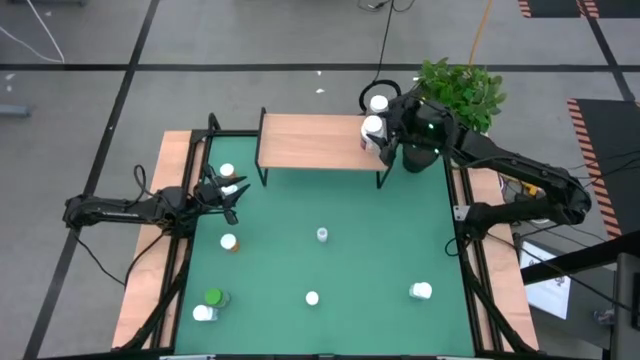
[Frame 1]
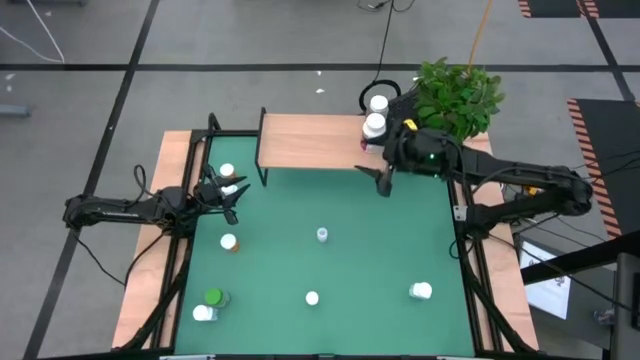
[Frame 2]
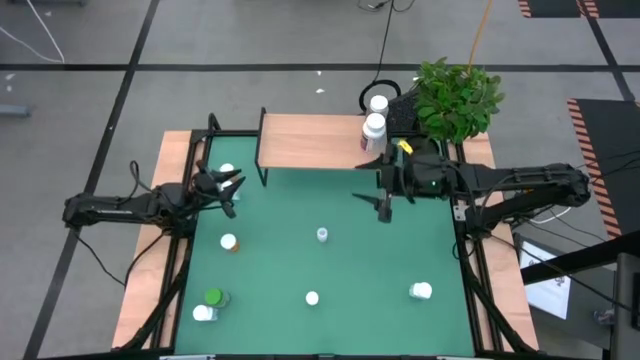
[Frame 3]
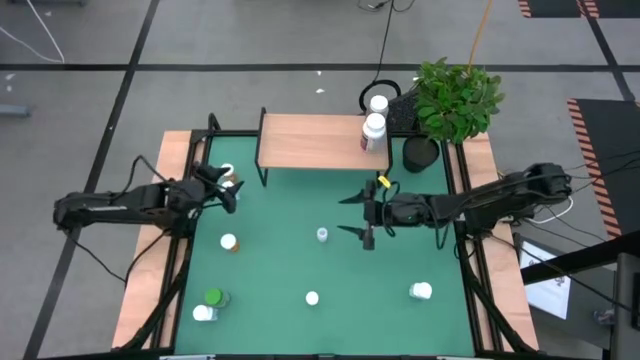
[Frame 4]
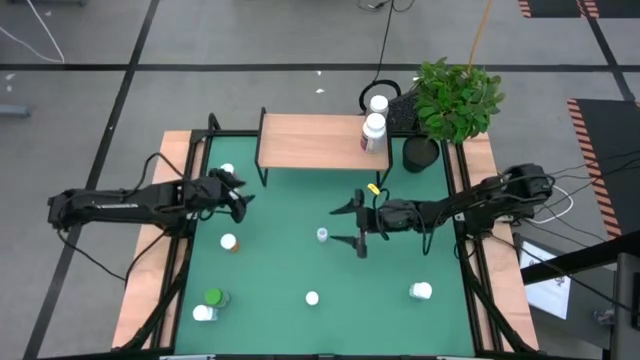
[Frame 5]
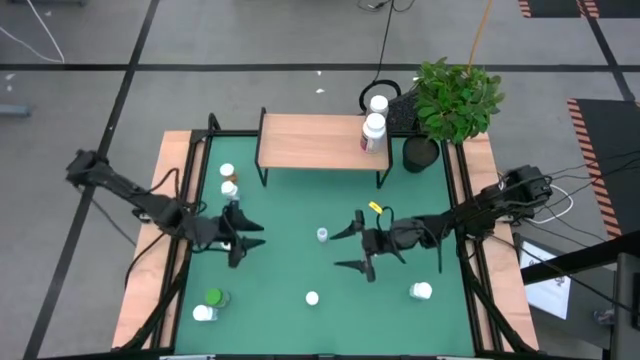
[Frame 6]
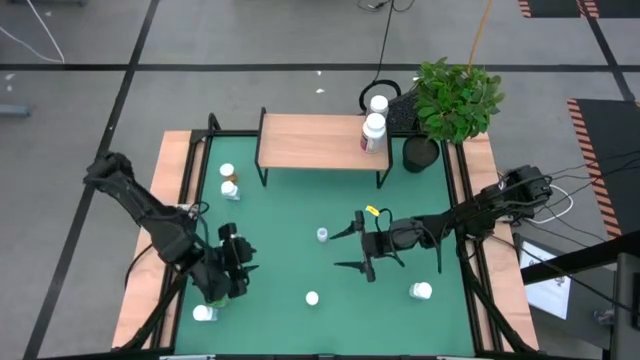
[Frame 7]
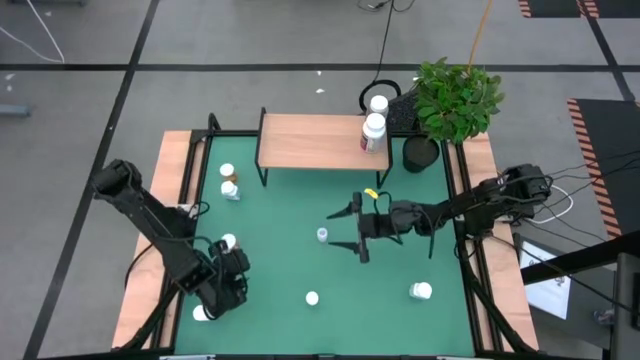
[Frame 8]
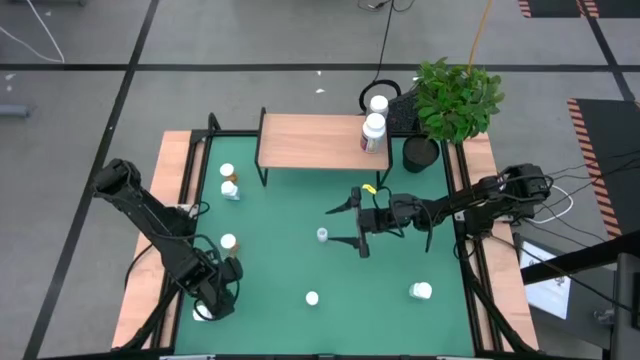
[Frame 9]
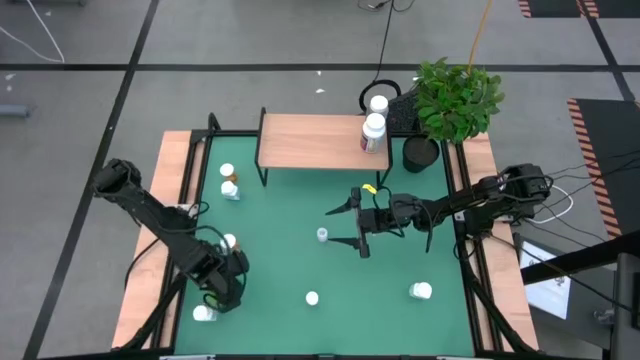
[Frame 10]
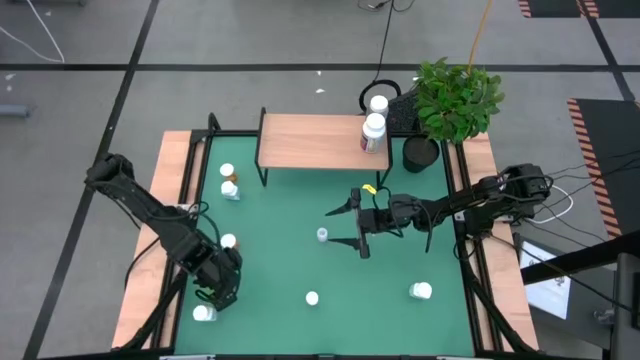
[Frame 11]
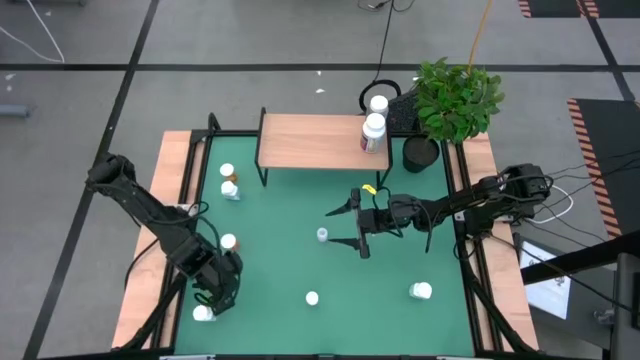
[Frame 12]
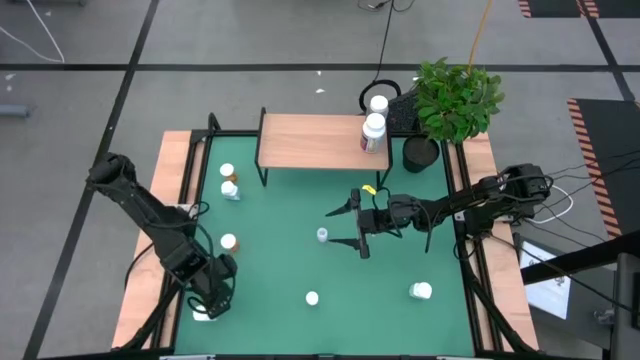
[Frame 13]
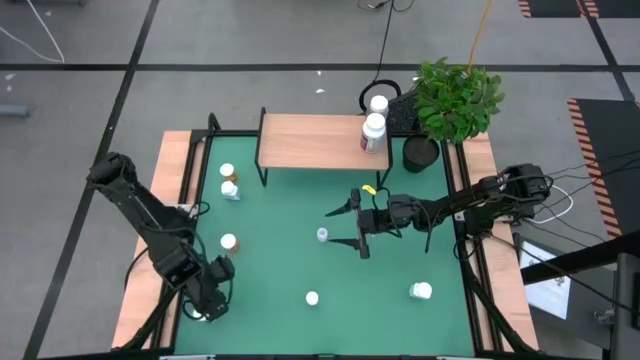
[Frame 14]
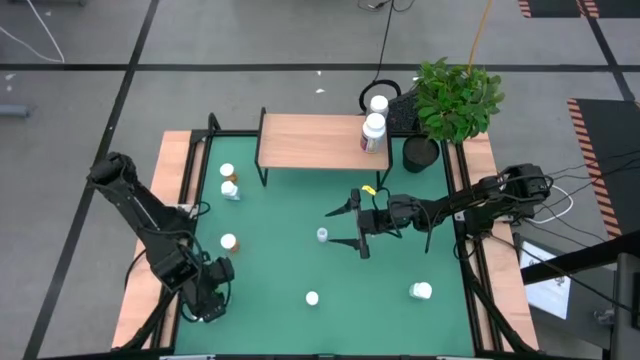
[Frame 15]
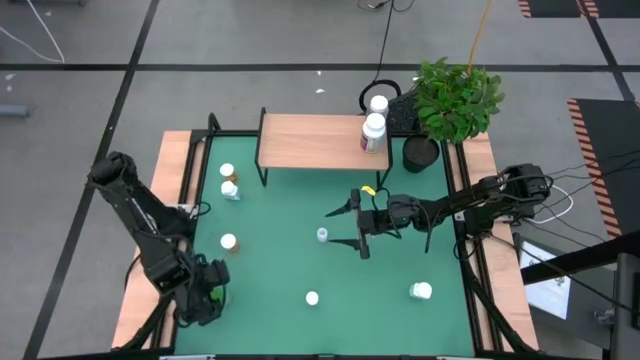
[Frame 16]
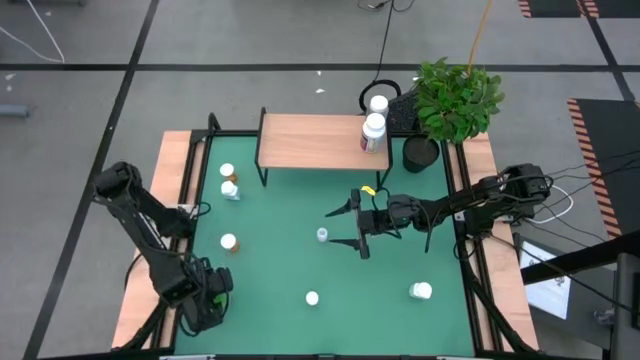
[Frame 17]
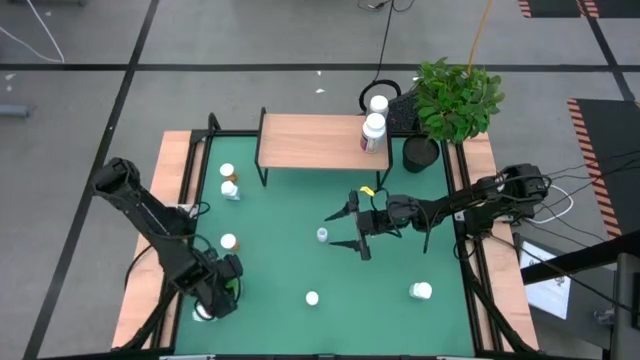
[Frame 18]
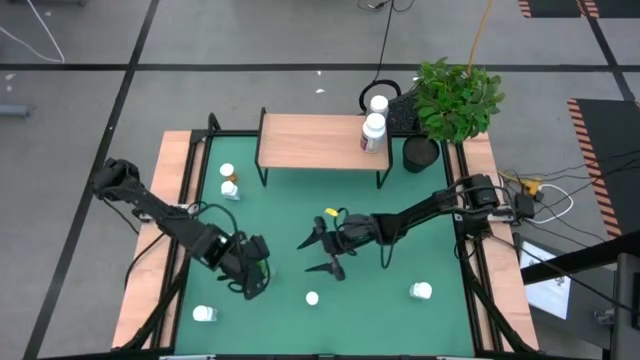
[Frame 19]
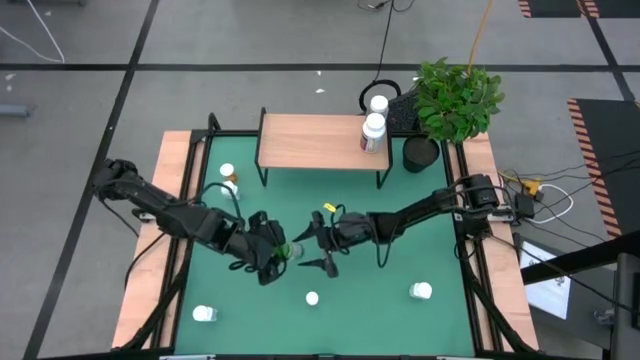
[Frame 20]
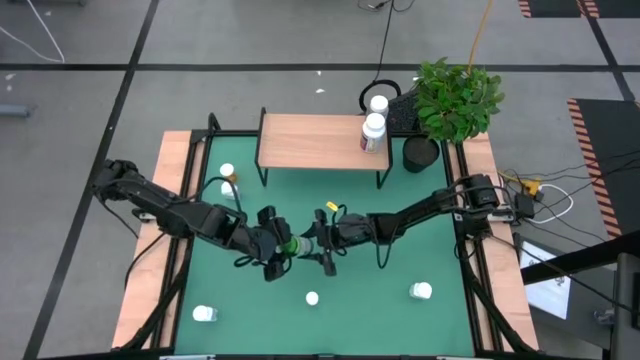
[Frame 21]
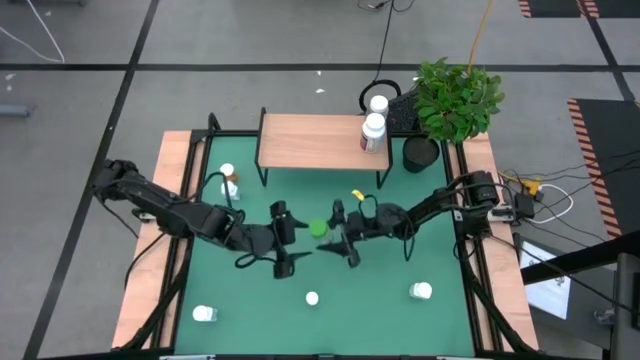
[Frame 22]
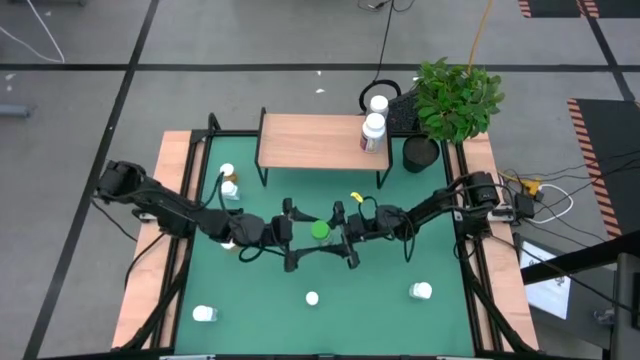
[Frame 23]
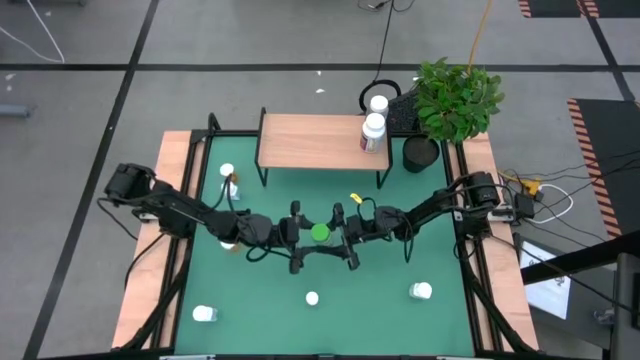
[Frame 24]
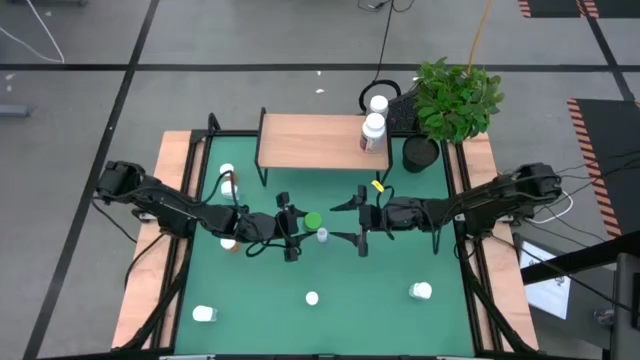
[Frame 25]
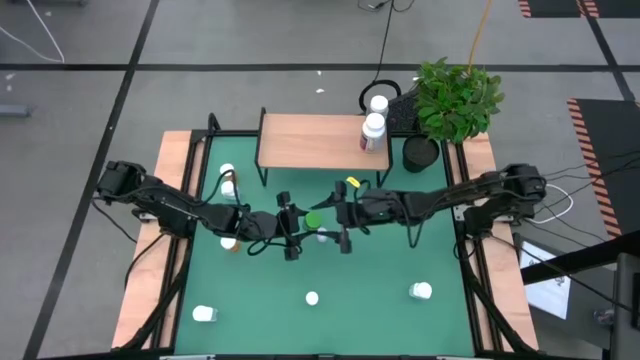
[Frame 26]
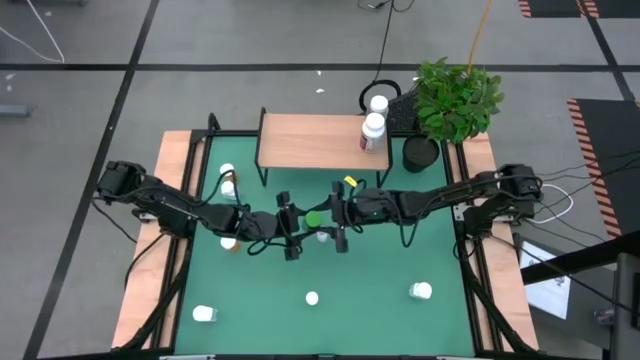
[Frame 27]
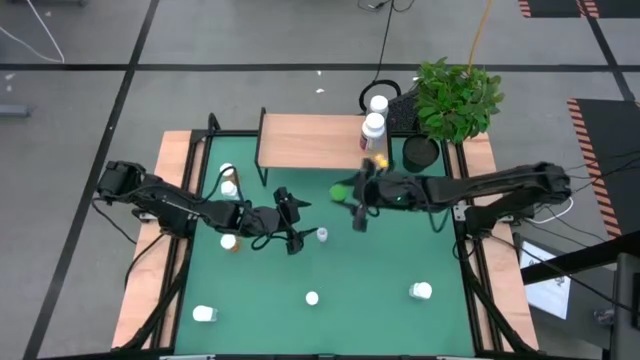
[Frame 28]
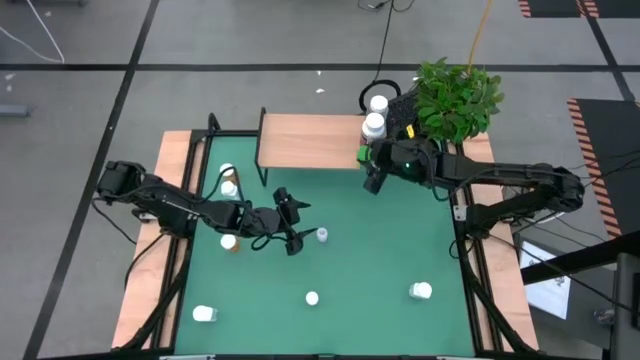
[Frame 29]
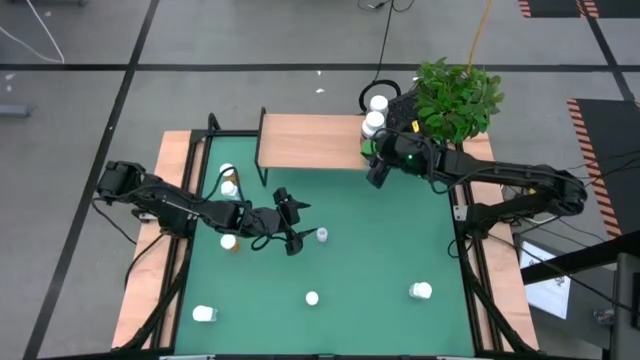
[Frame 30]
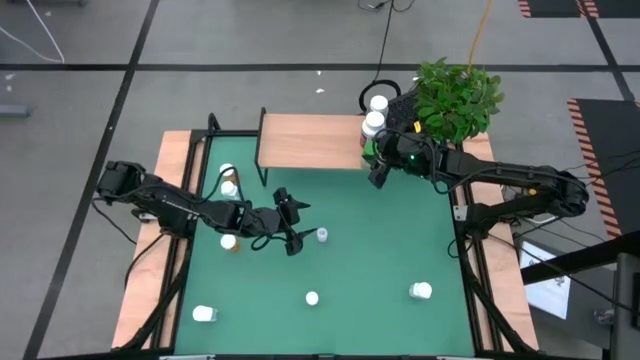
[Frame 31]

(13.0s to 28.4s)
Task: Pick and place medicine bottles onto shelf by color
Put the big green pill bottle on the shelf

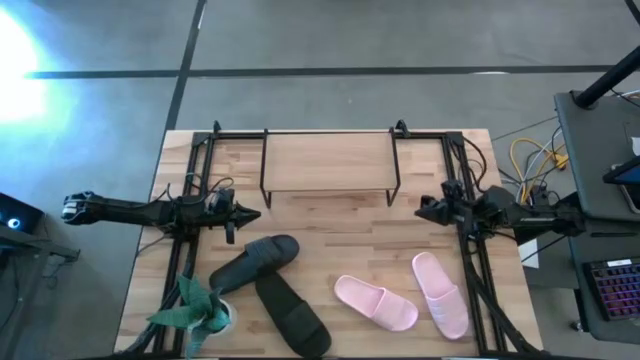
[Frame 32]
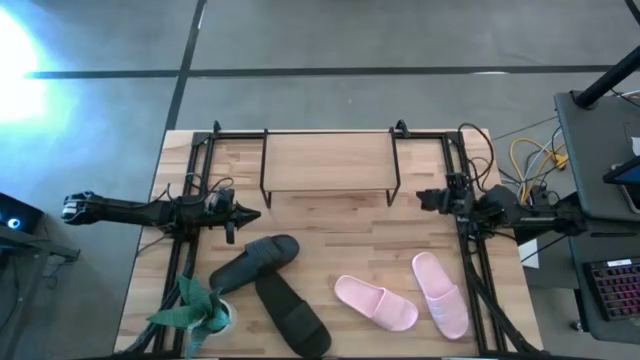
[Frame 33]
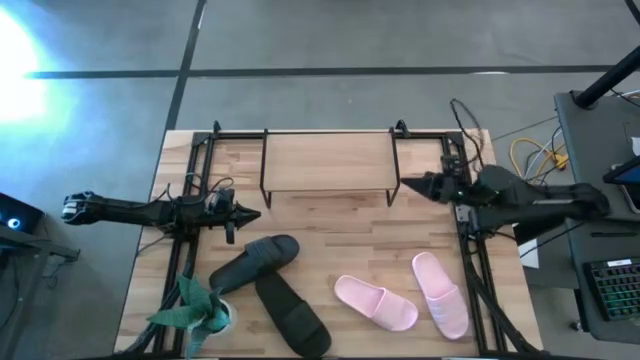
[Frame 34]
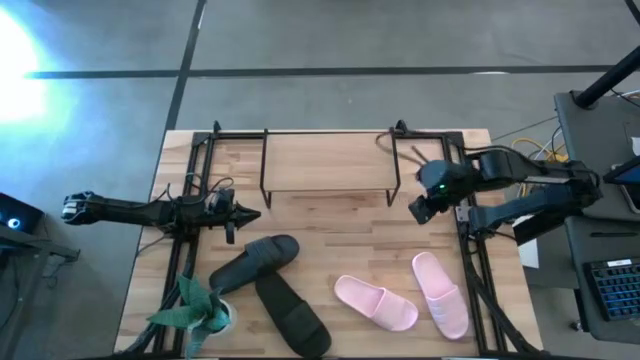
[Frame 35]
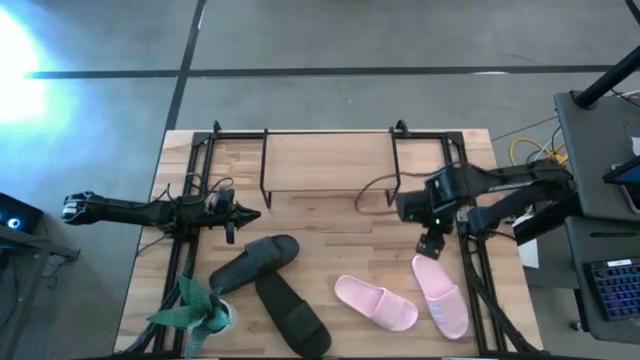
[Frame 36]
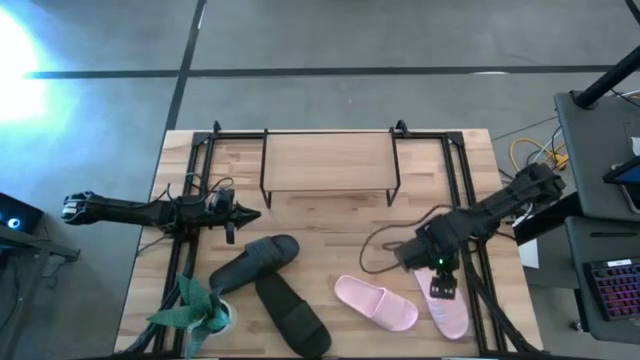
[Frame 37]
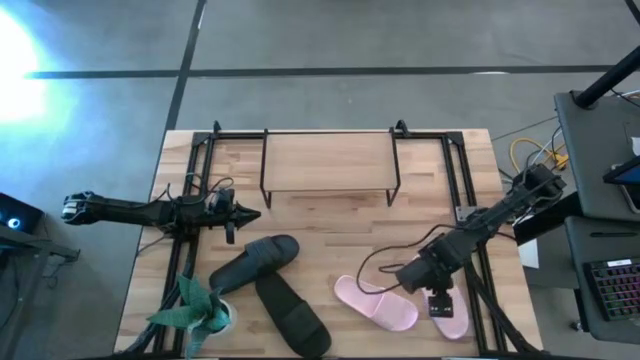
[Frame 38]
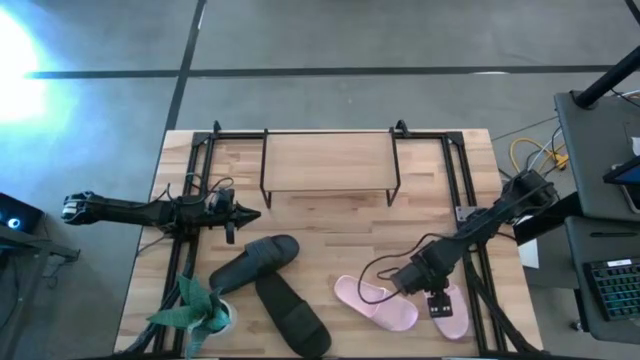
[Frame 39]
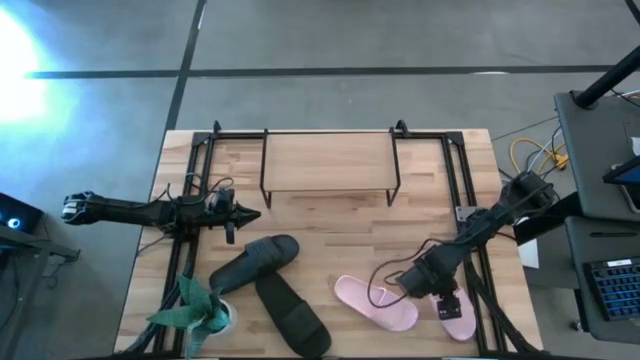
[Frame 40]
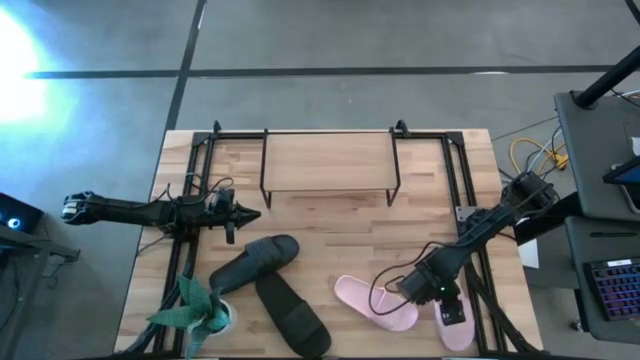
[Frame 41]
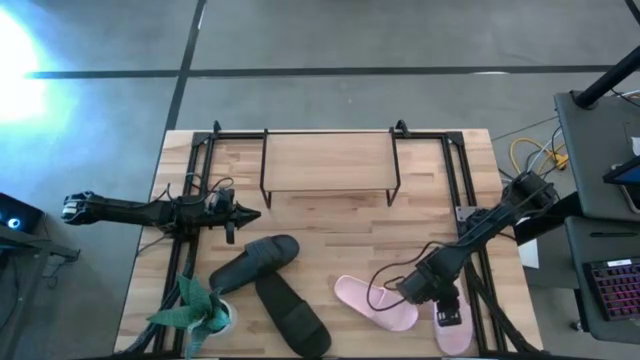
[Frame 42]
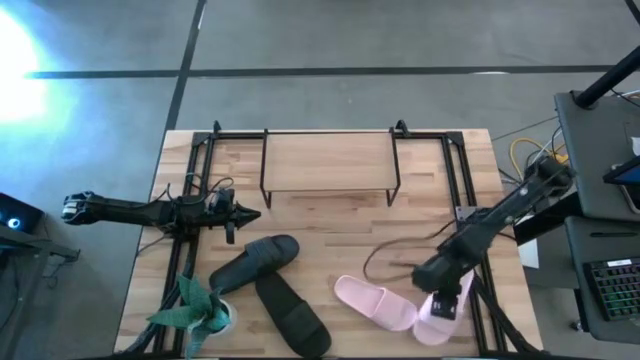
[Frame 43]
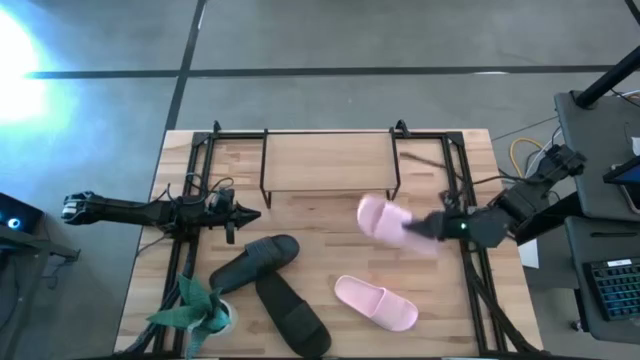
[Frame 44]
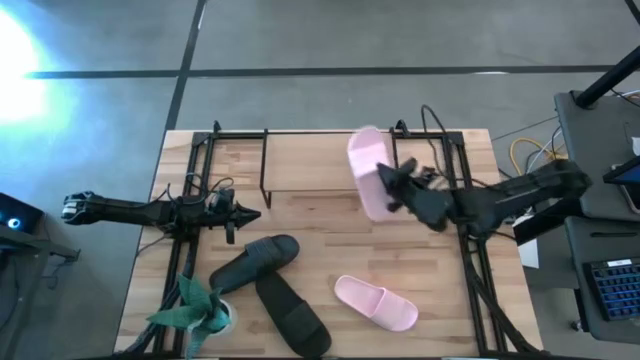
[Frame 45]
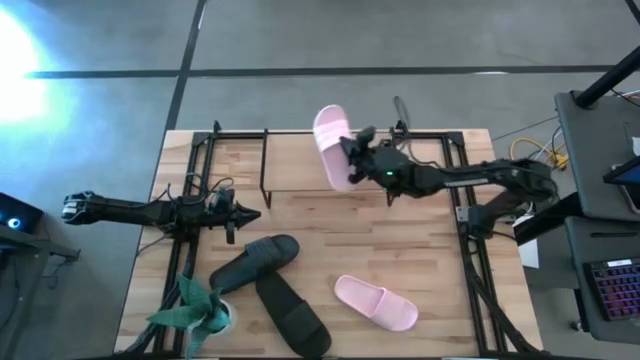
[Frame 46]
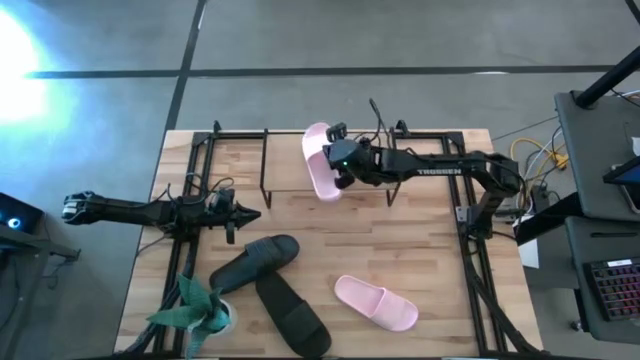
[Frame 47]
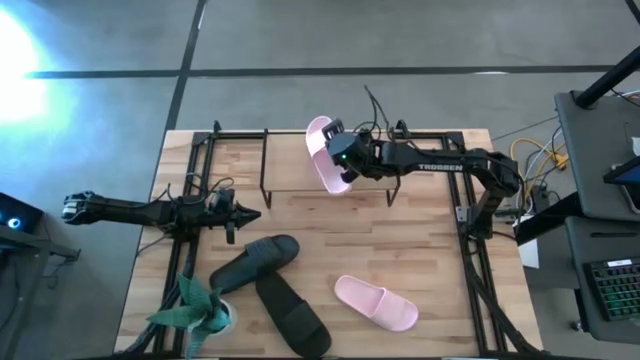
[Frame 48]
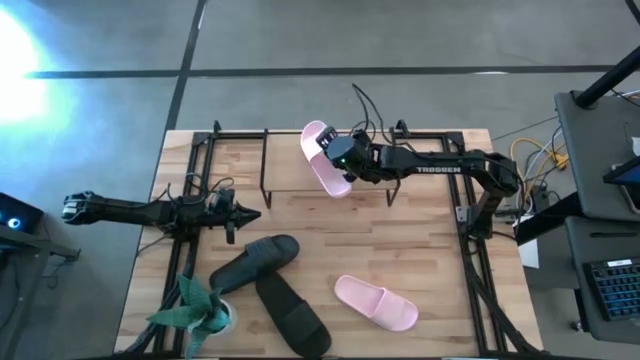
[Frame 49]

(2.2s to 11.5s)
Task: Pick and place slides into the shelf
Put the right pink slide on the shelf
